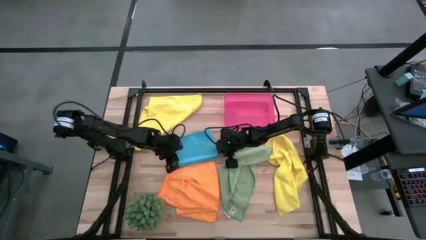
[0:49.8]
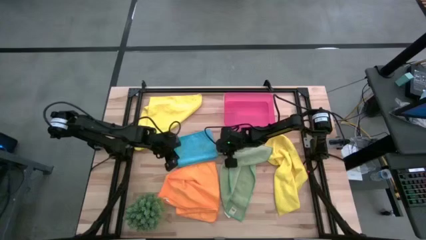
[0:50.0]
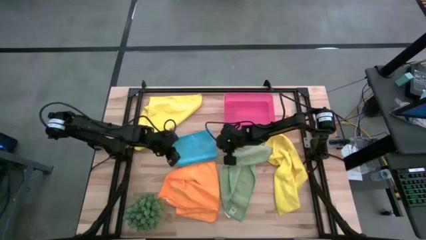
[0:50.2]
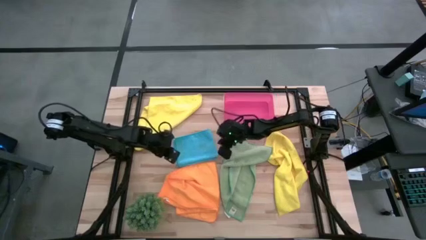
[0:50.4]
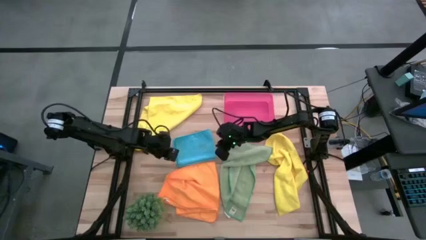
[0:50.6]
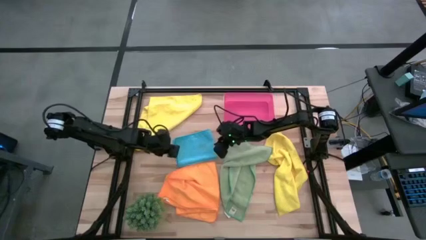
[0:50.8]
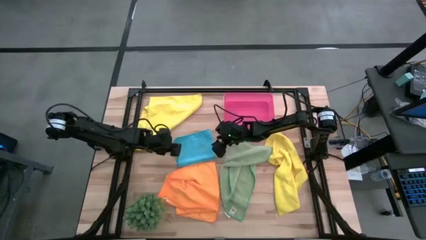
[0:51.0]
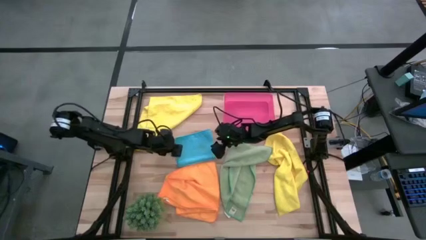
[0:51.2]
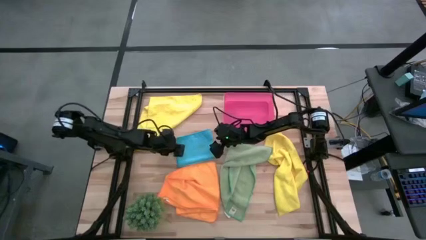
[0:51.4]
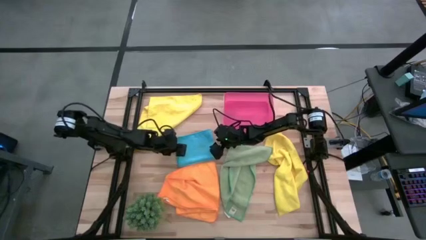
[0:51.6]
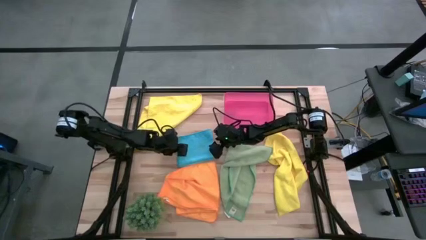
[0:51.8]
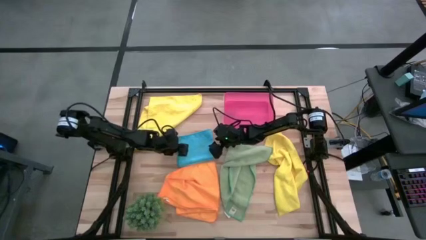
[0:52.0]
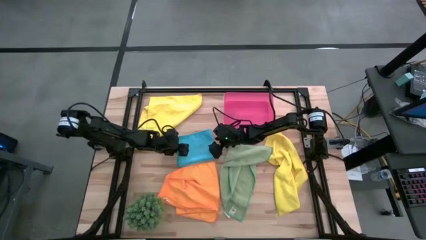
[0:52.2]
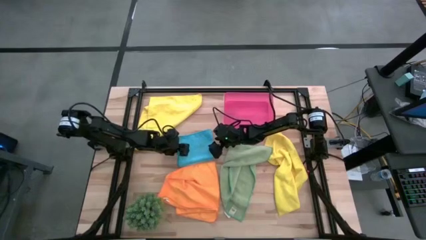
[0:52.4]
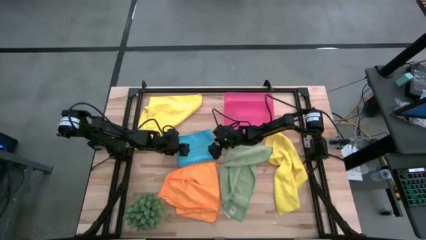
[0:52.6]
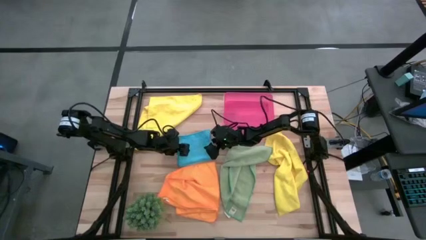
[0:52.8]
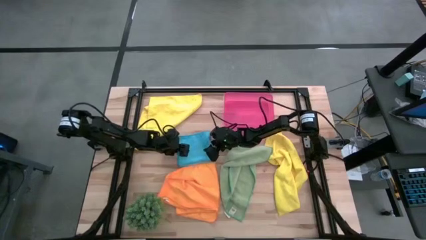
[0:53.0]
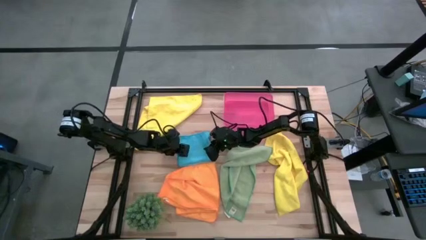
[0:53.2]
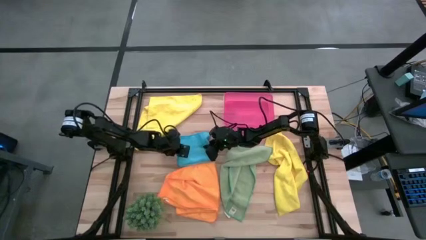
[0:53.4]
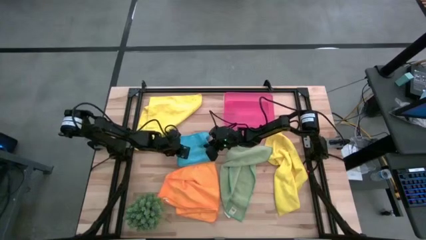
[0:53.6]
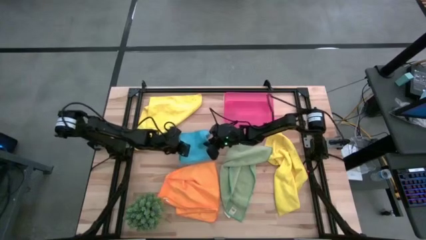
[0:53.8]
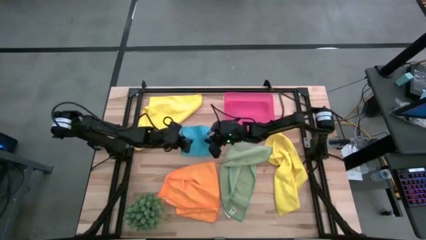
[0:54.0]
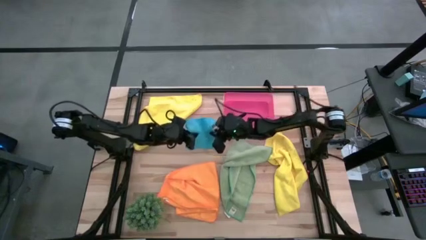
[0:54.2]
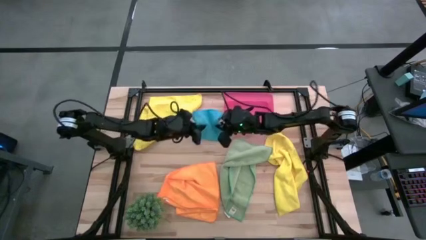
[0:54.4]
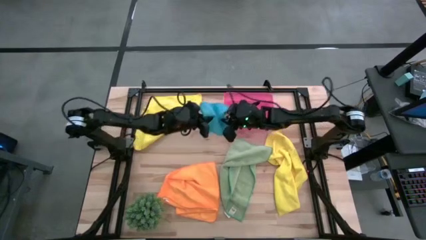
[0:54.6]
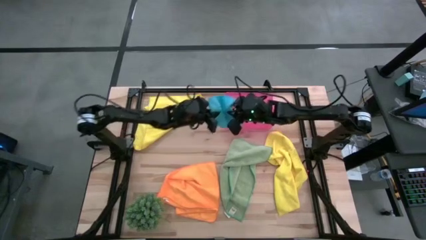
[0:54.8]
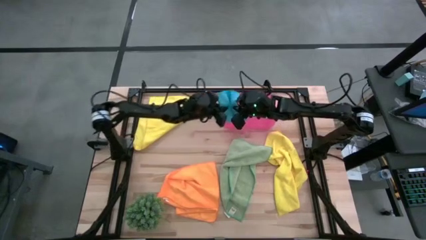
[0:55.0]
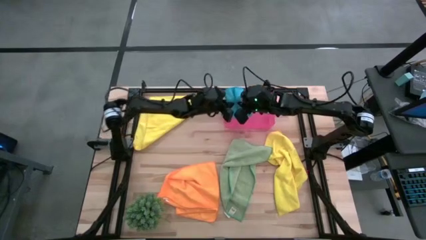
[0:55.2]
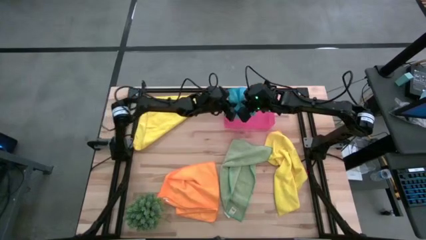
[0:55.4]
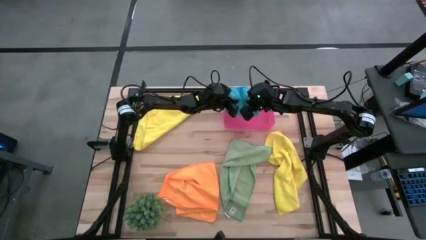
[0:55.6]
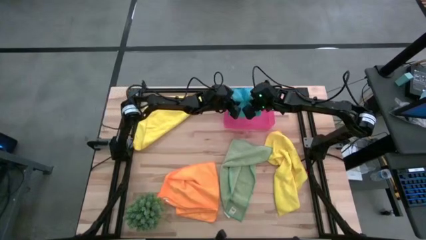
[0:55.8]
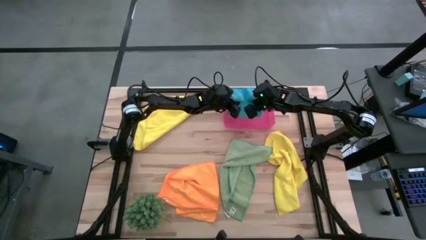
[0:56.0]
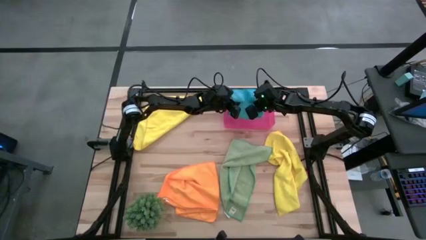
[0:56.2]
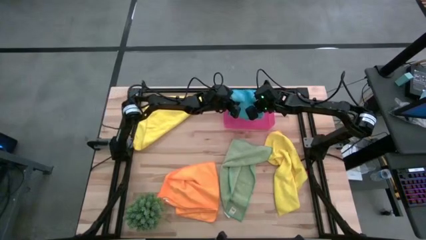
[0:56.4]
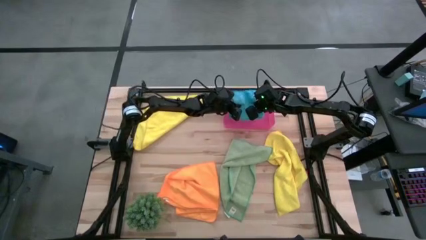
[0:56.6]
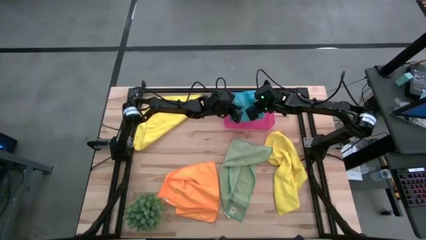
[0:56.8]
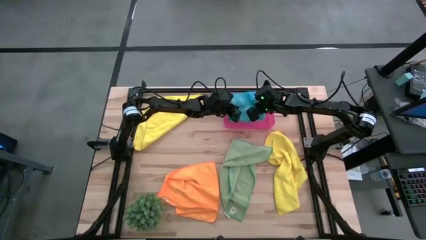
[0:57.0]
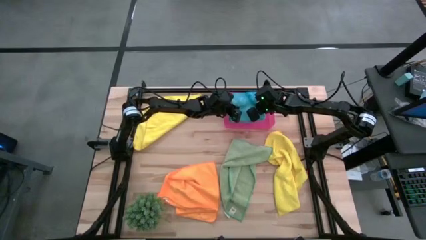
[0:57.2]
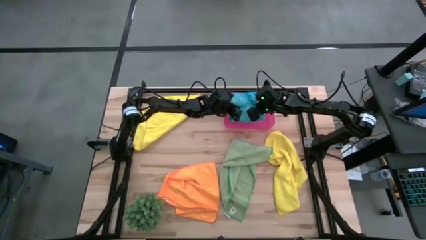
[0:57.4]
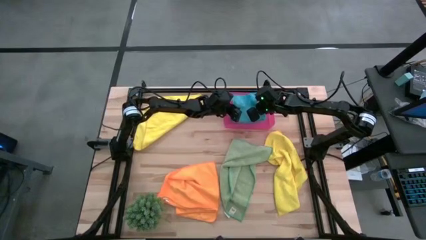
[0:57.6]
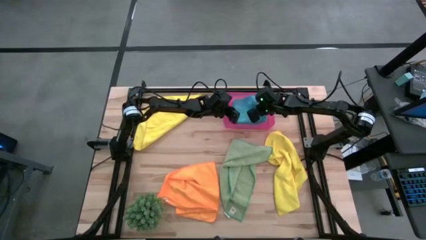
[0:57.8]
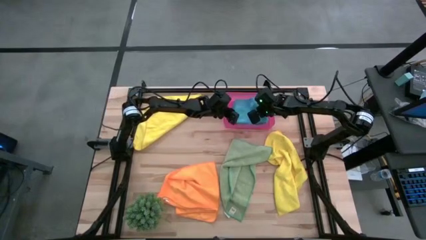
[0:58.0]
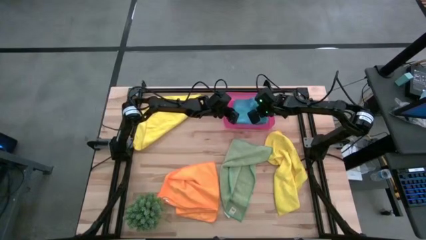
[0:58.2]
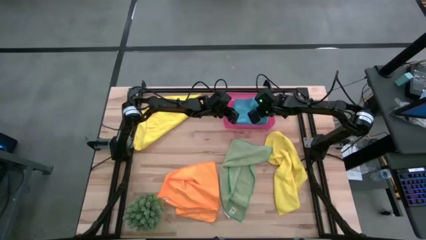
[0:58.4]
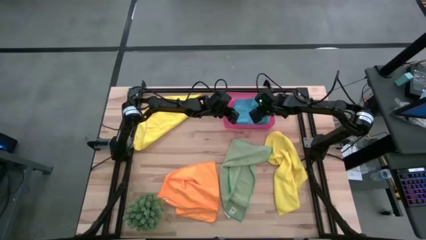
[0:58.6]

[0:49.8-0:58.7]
Task: Fold microfiber towels
Put the folded blue microfiber cloth into the red bin

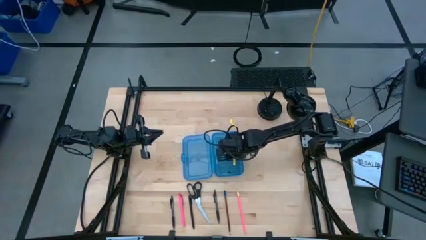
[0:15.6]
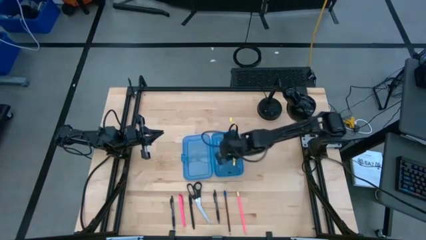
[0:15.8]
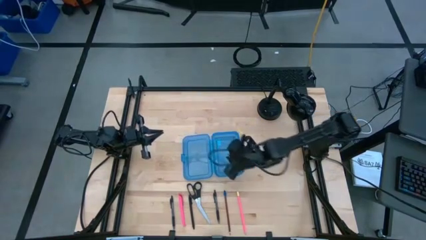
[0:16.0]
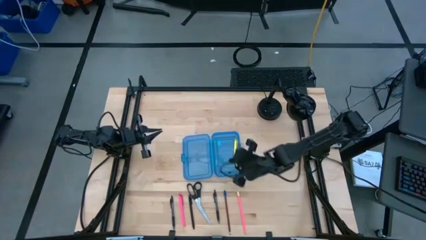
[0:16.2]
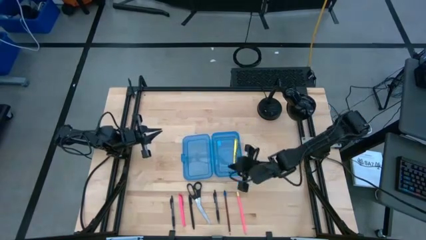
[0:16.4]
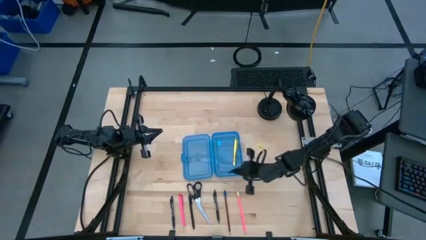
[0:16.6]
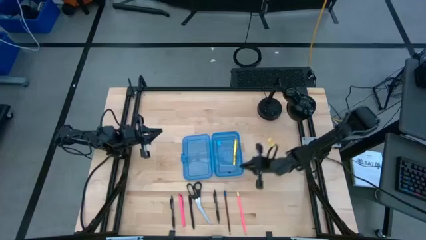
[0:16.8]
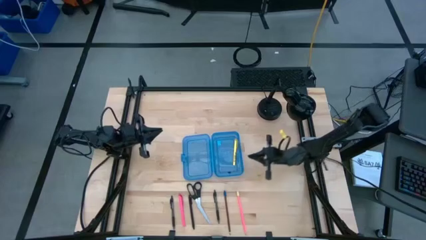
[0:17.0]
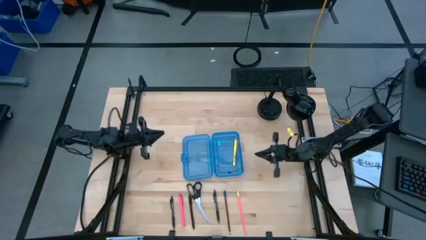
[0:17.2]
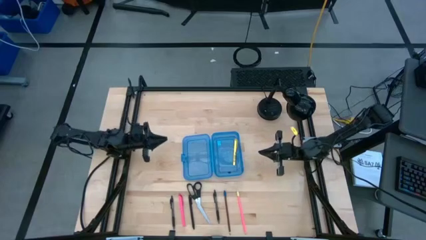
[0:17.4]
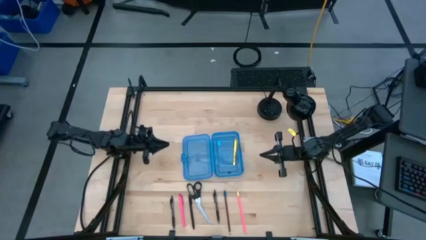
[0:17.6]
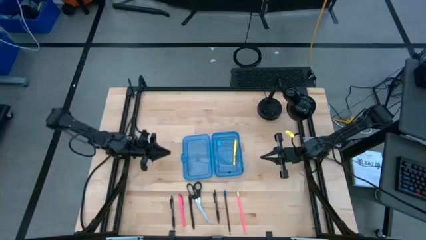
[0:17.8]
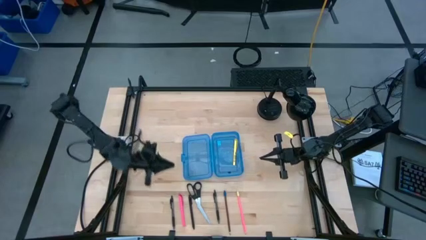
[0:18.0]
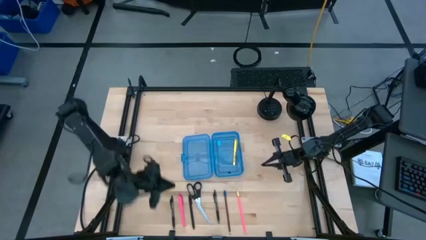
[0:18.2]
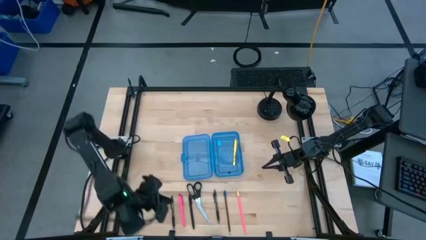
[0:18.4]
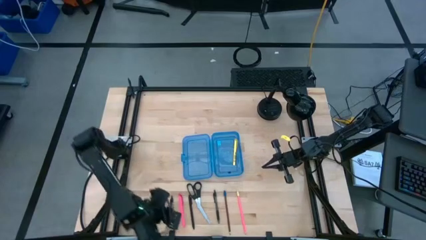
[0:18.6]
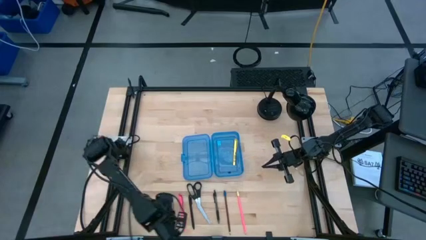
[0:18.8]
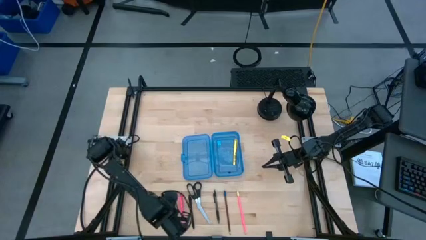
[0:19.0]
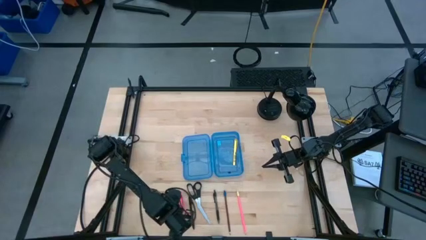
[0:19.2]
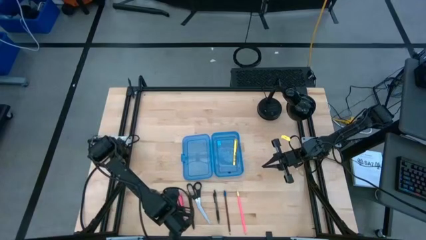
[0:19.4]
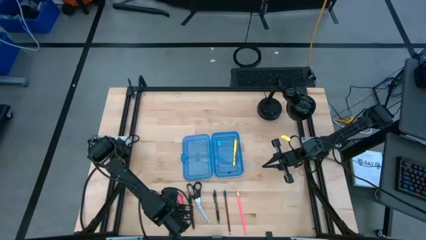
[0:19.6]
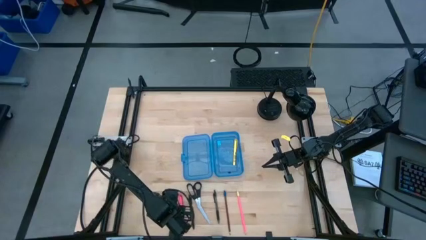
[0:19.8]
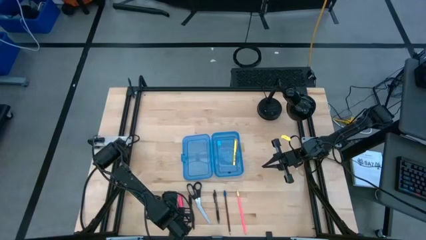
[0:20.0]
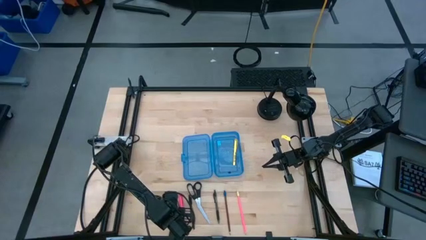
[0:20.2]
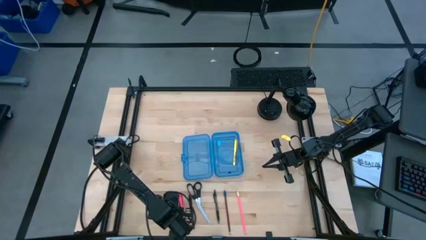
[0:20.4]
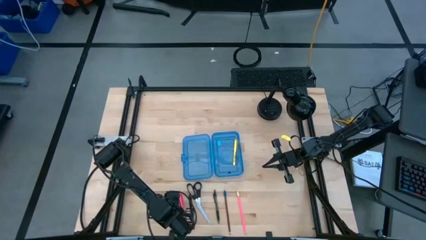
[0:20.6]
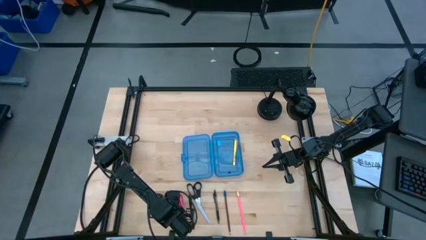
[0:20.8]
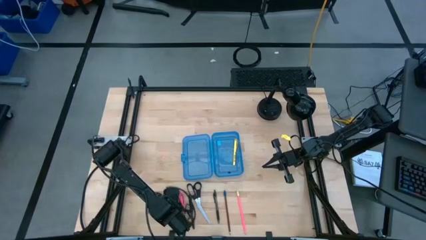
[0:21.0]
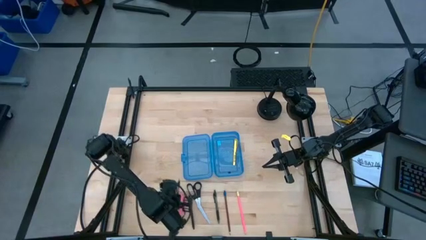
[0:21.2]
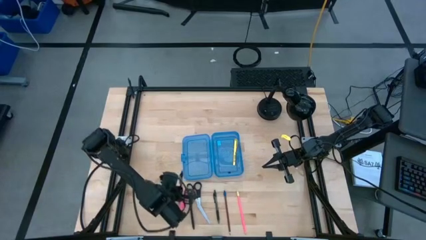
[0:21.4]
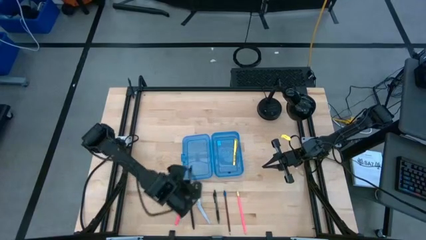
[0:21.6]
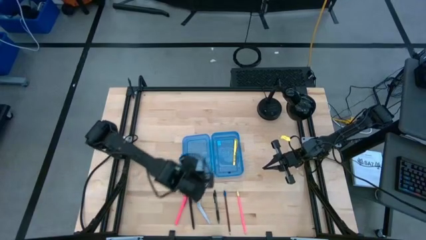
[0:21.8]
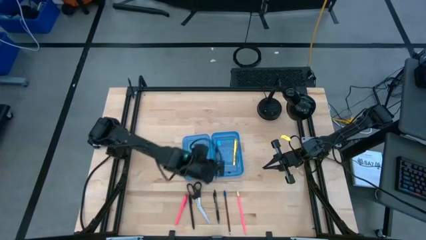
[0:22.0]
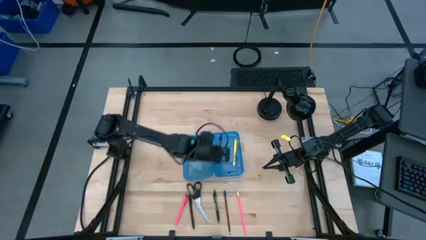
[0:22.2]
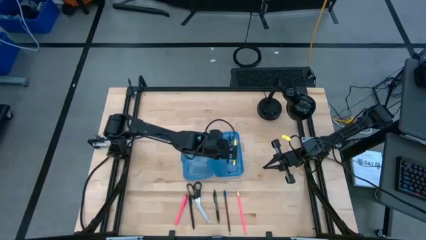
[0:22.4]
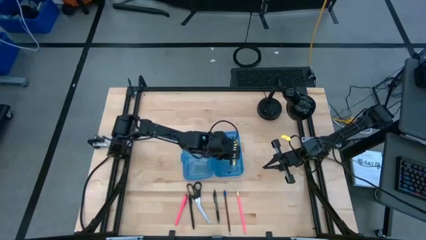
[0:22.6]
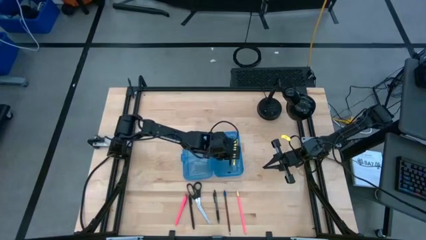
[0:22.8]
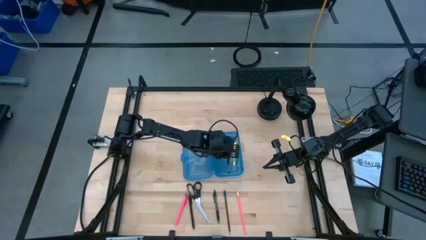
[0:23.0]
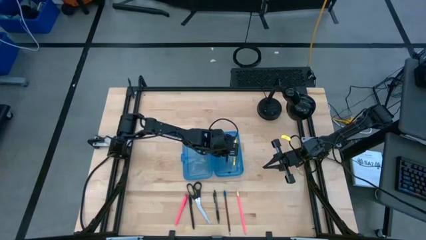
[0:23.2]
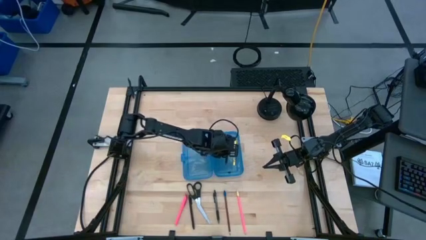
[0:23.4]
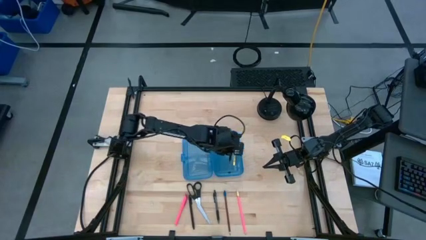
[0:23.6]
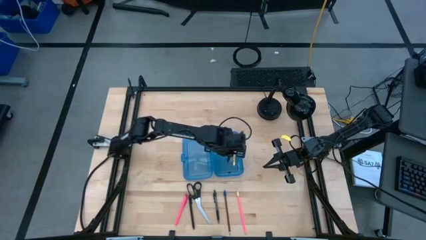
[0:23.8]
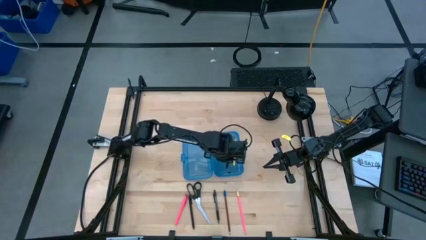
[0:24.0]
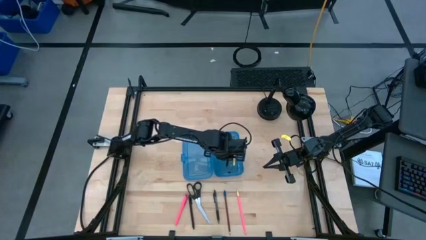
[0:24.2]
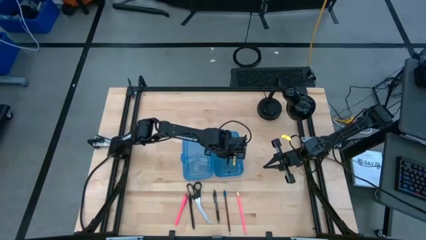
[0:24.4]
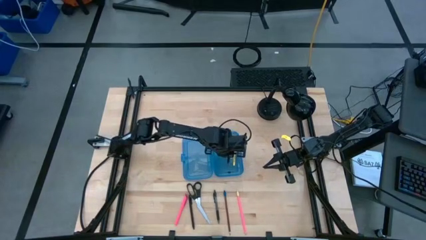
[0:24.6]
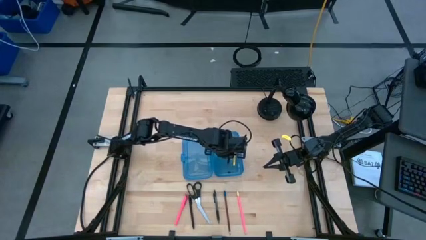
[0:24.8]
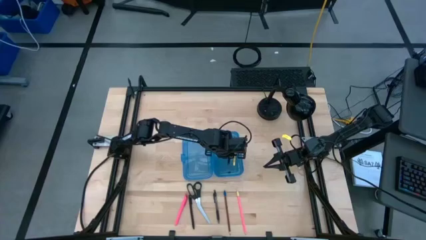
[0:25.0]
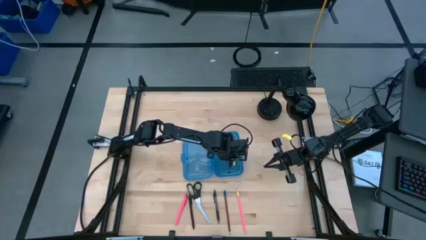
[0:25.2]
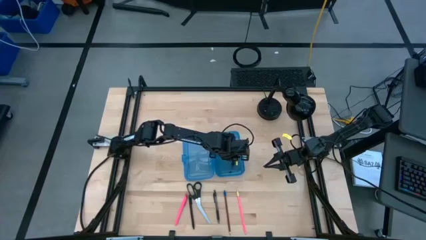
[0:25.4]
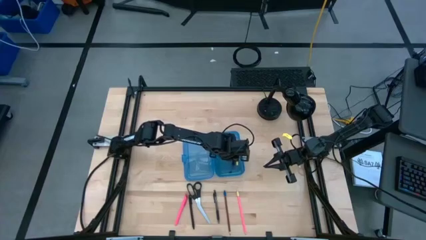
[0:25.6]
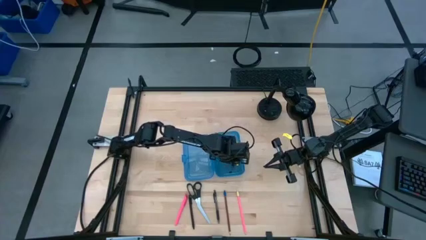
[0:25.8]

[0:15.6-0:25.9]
Task: Pick & place school supplies into a supply box
Put the left black transparent pen into the blue supply box
